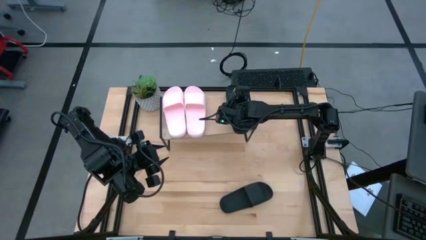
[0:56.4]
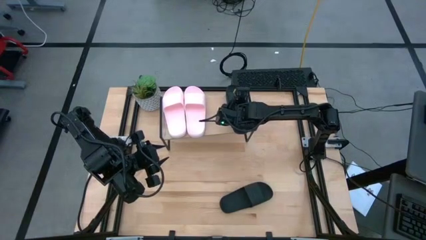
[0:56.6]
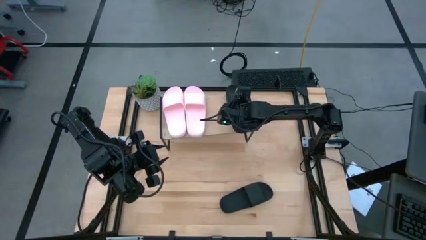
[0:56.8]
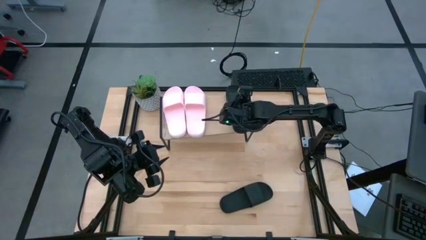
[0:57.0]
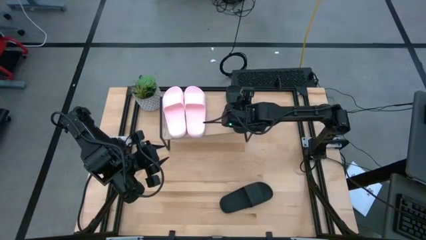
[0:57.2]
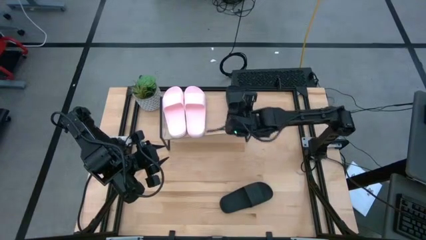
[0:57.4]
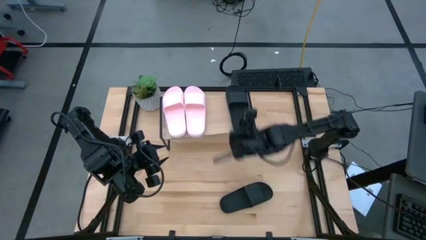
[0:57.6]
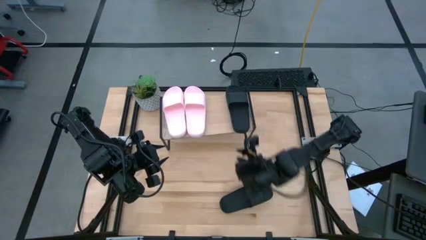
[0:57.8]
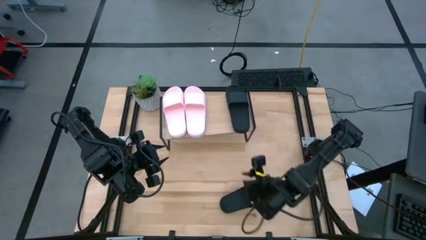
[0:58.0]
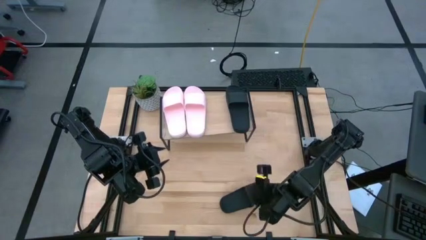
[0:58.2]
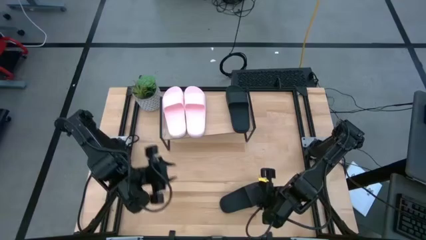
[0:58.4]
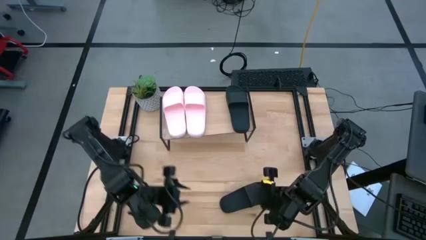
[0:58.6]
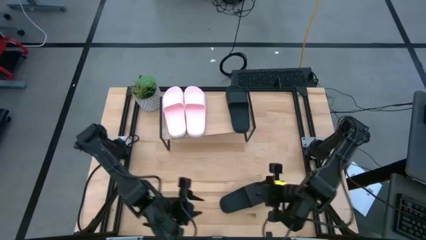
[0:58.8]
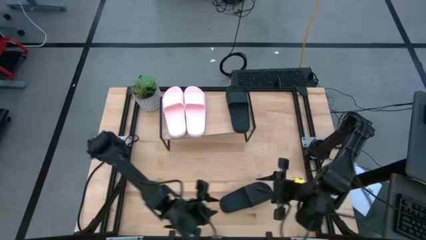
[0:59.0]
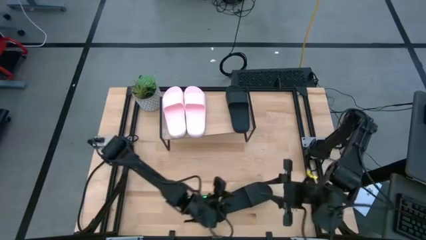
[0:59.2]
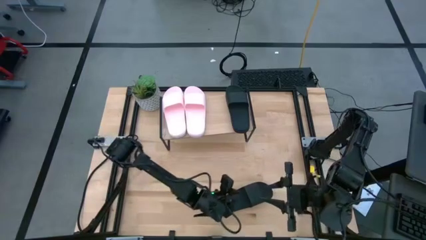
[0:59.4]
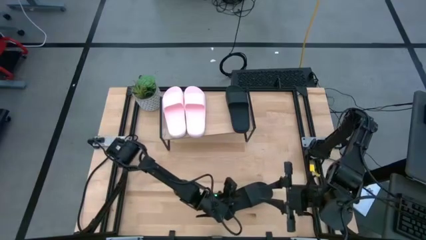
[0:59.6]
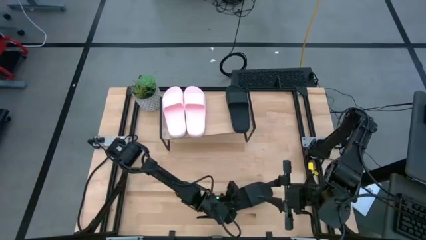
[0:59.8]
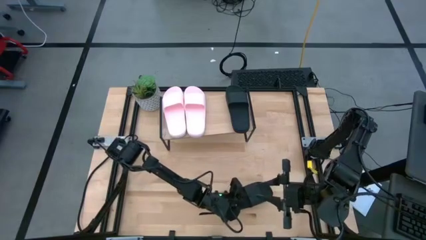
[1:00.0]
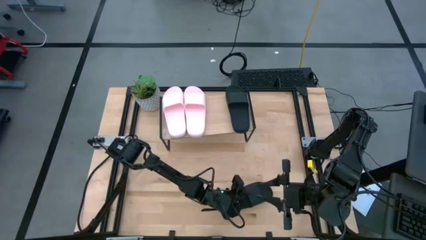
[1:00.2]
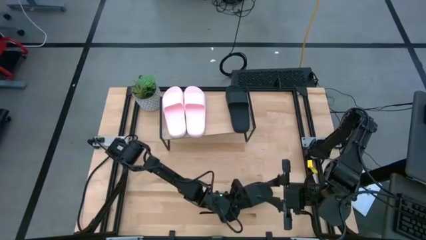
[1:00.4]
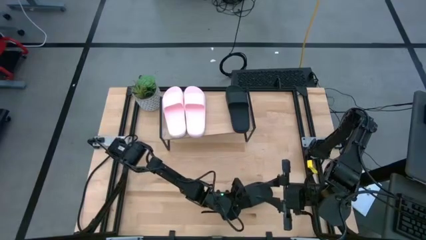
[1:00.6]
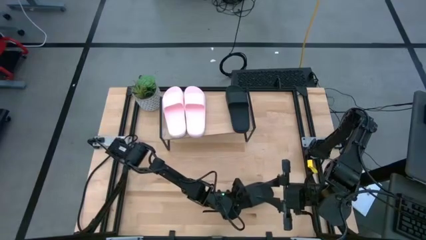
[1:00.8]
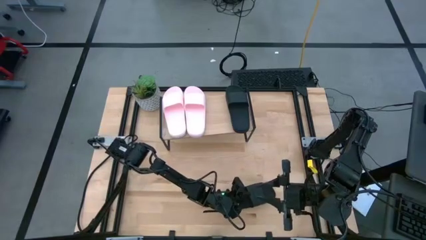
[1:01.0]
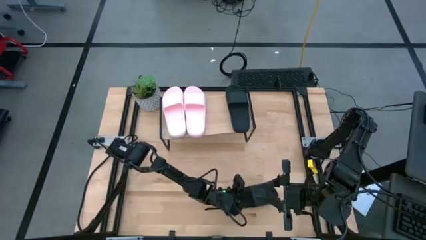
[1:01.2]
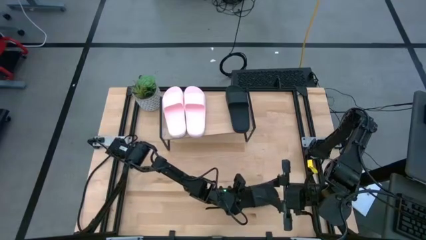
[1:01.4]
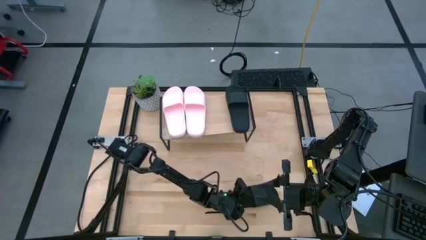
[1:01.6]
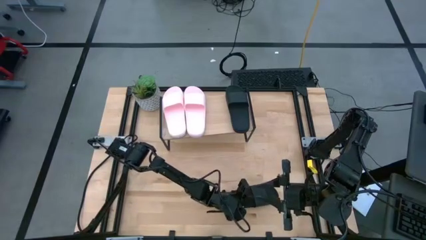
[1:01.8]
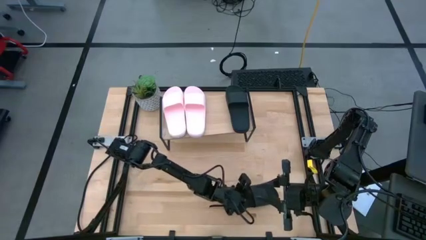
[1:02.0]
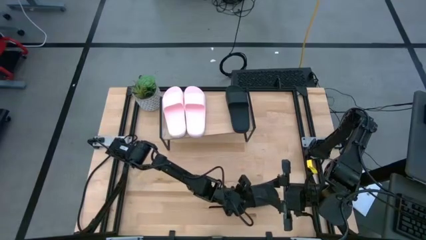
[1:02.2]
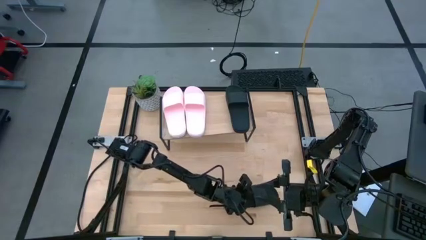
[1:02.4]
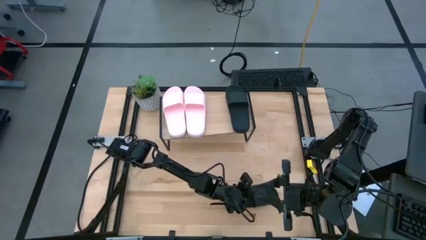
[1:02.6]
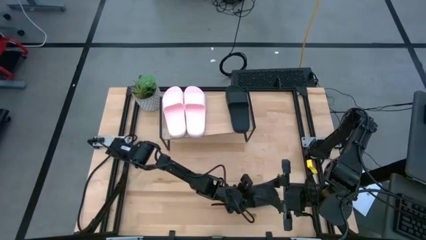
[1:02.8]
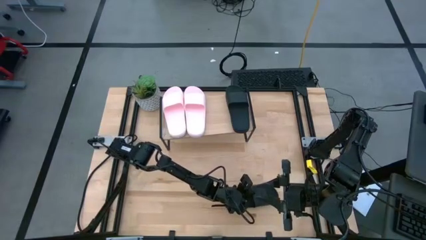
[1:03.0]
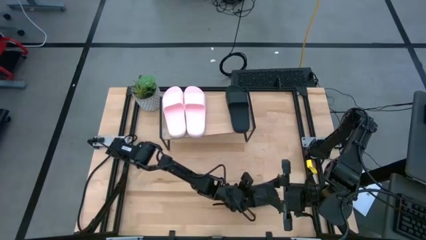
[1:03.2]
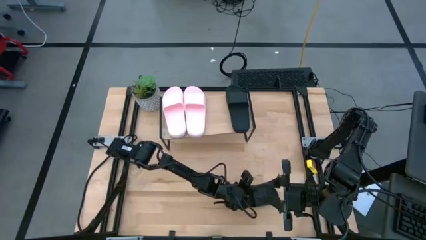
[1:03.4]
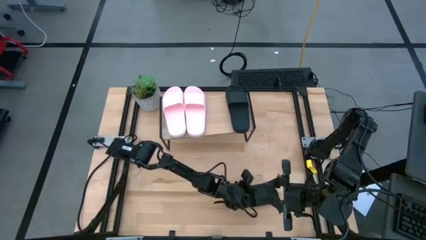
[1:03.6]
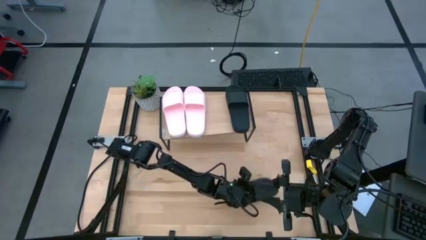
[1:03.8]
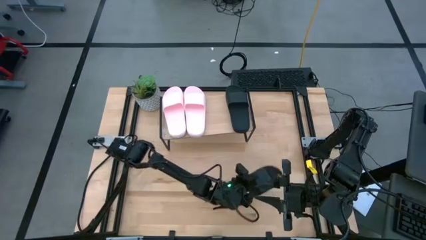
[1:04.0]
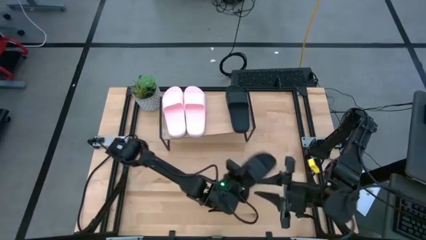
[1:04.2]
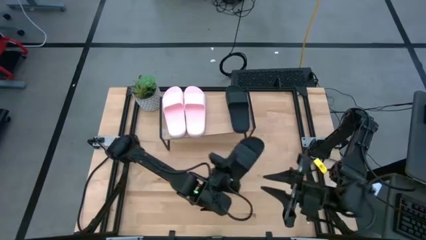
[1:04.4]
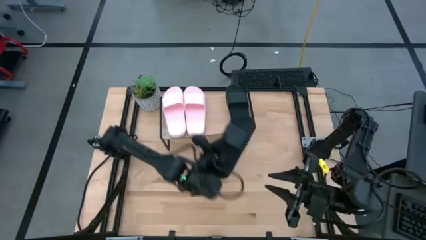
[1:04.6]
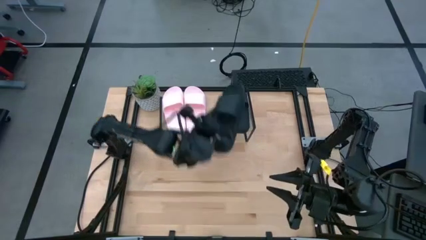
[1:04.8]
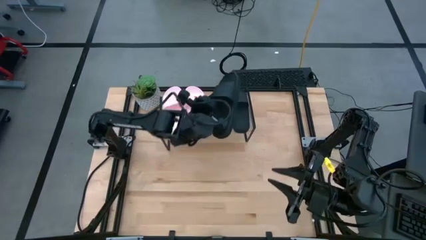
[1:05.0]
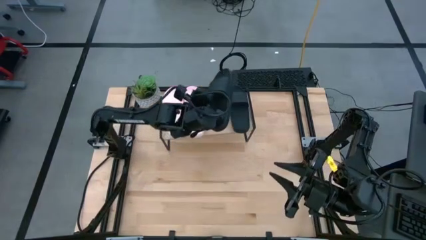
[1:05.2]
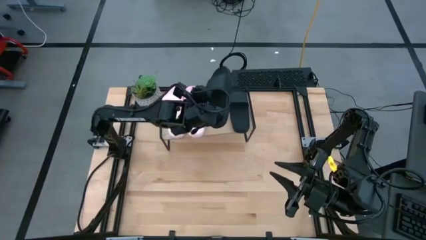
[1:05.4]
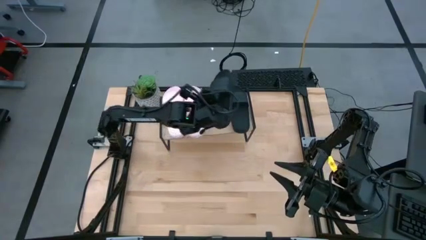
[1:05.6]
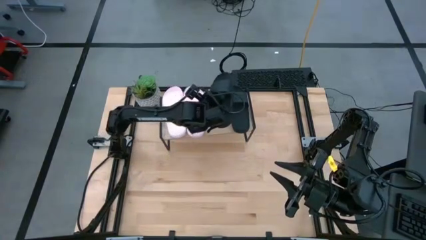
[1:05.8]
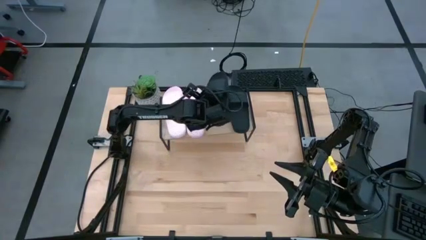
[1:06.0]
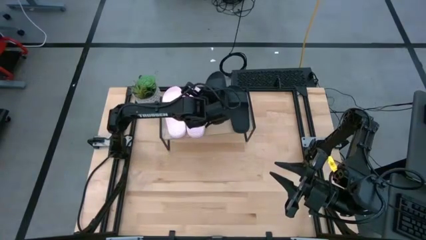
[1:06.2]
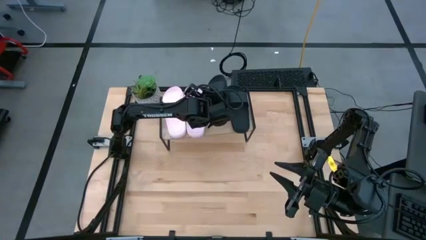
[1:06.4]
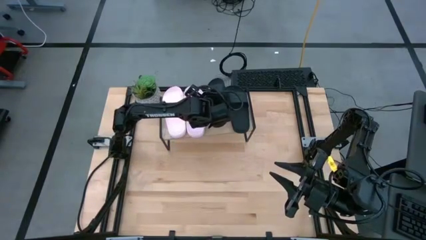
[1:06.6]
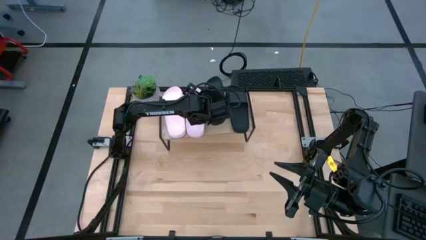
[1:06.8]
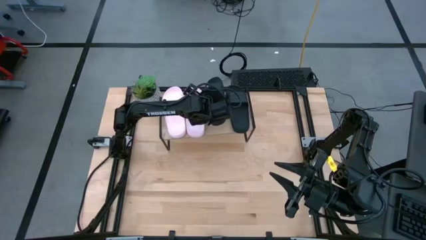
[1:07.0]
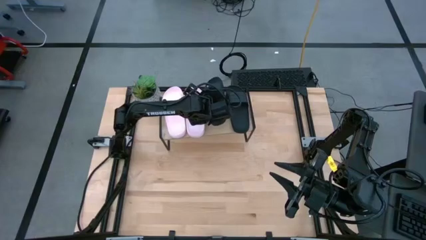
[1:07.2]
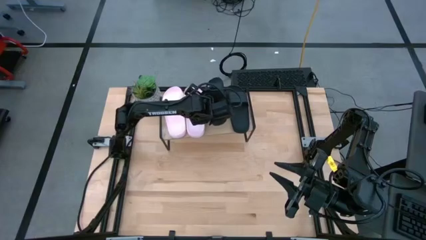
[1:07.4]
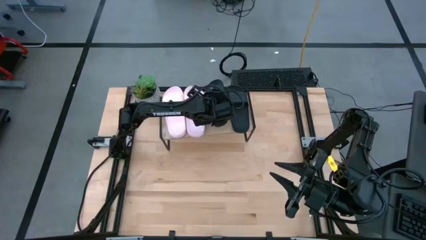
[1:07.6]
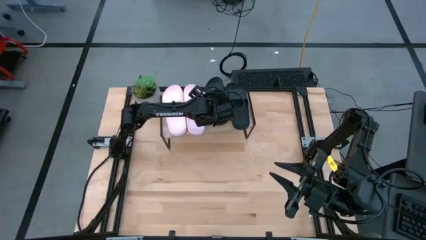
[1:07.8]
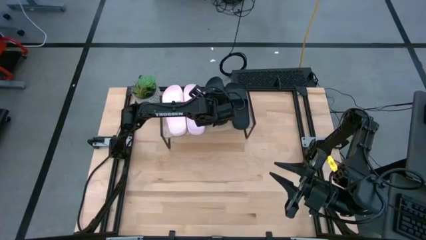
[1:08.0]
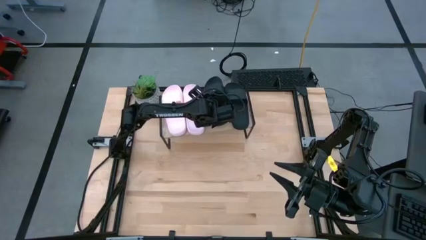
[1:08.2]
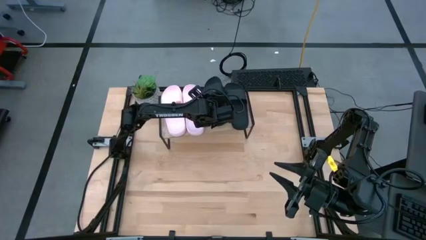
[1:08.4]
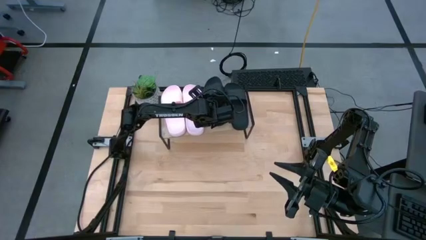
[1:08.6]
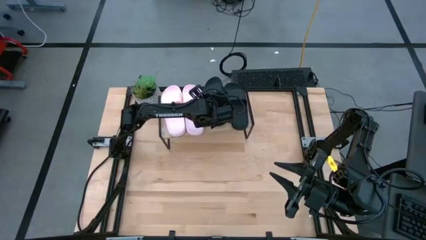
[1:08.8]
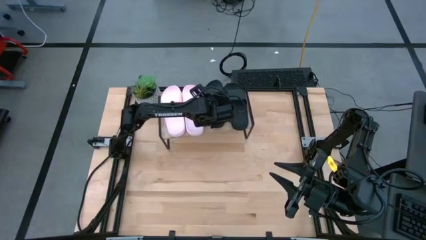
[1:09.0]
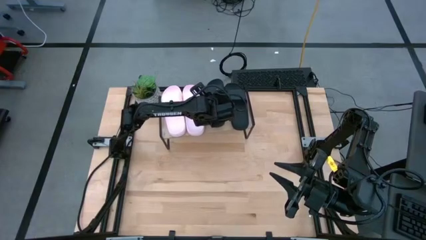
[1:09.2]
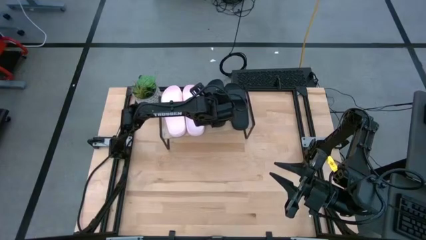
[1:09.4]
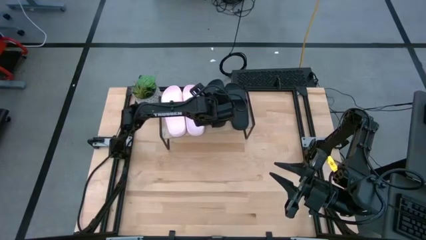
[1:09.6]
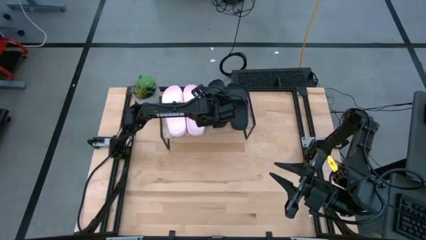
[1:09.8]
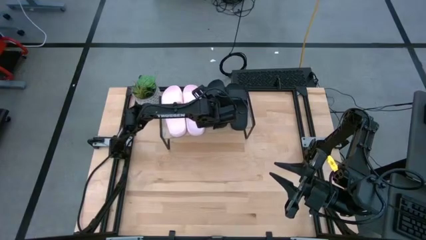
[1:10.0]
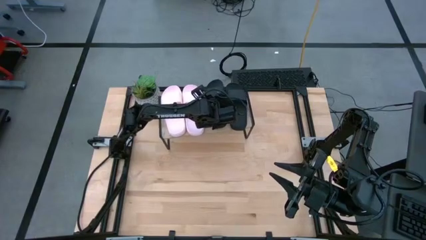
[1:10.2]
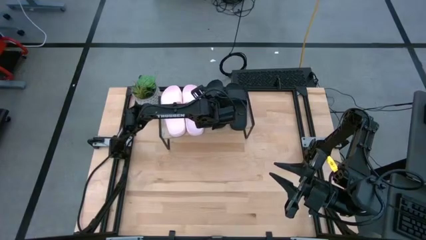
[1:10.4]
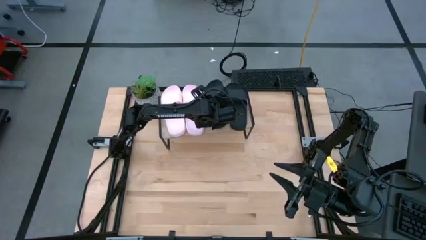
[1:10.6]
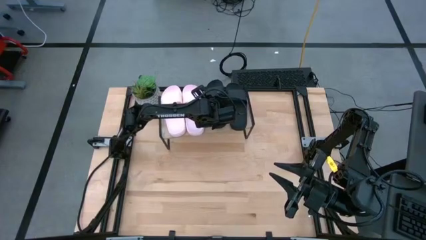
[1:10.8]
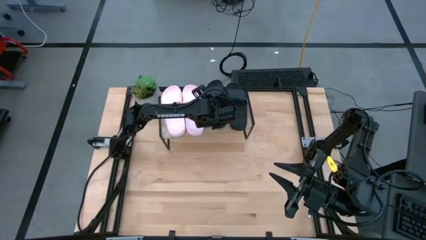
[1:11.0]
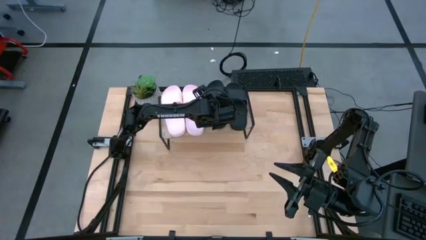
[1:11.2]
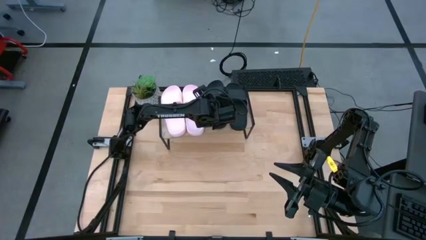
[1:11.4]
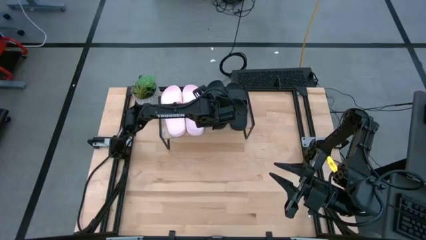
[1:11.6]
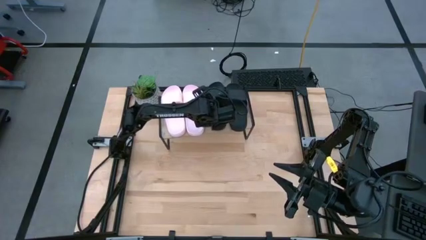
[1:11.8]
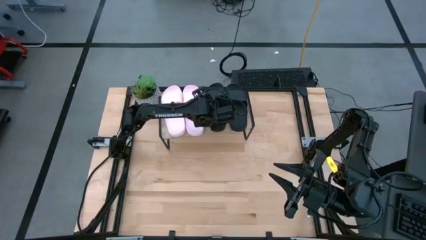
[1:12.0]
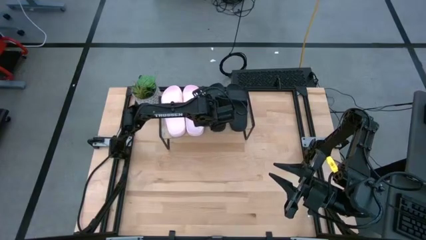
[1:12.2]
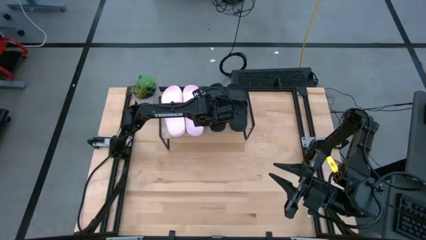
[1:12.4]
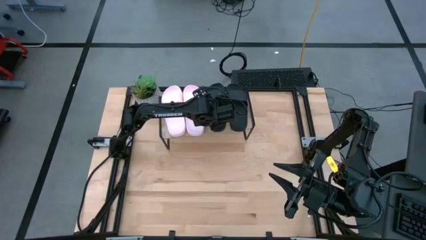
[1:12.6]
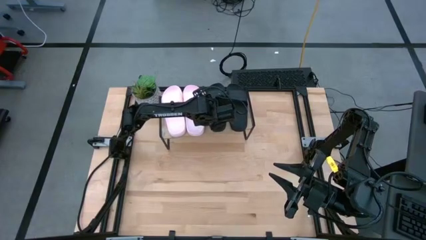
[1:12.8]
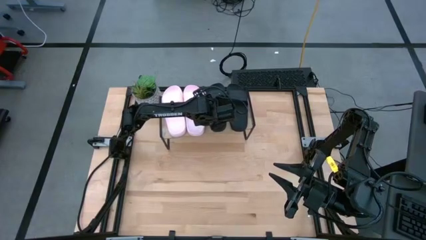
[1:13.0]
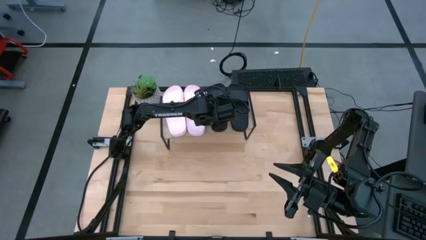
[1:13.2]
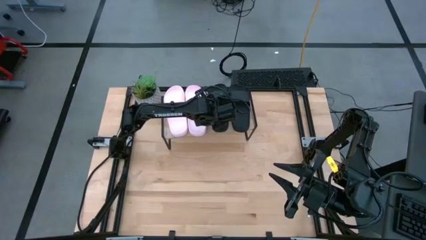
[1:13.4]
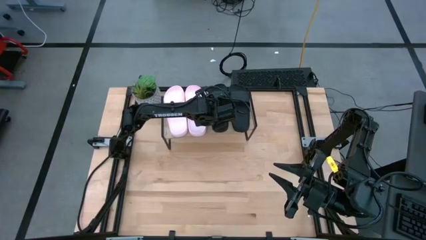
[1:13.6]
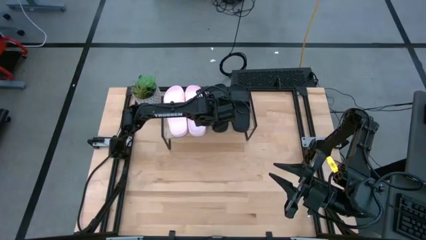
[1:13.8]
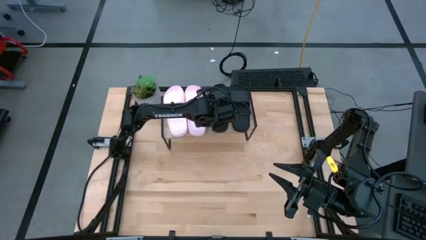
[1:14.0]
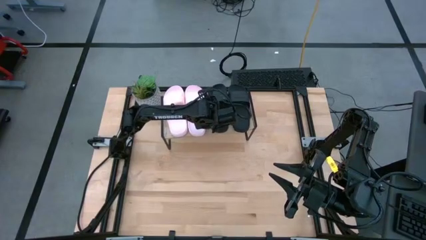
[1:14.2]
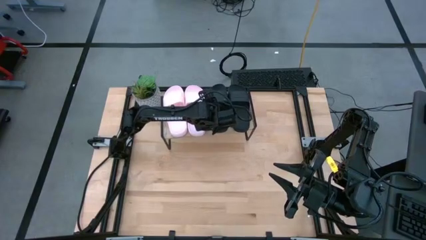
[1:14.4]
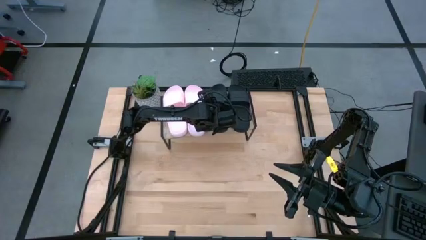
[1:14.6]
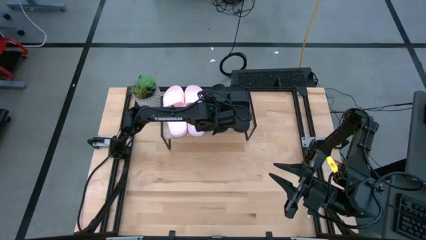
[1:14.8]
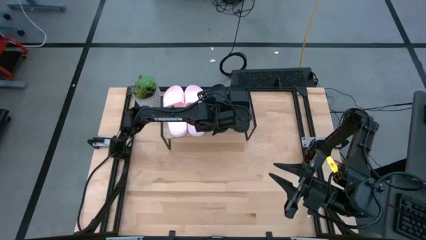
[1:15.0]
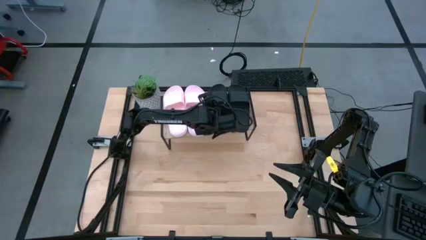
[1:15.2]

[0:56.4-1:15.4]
Task: Pick and place slides into the shelf
Put the black slipper on the shelf
